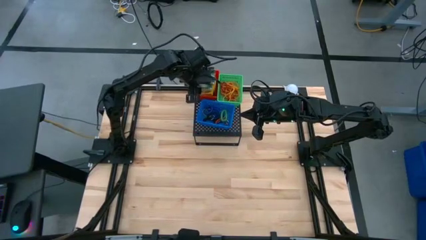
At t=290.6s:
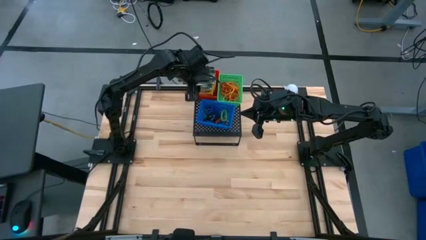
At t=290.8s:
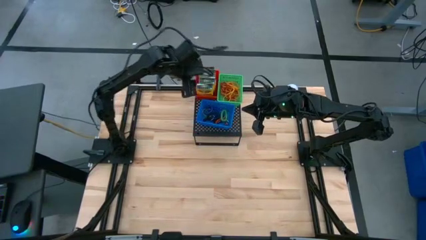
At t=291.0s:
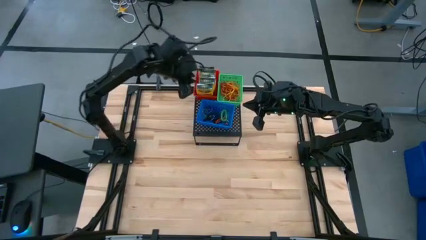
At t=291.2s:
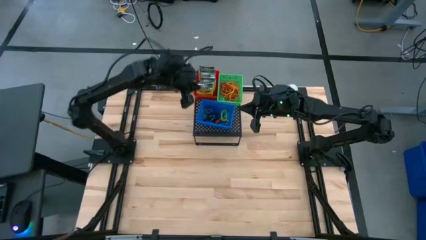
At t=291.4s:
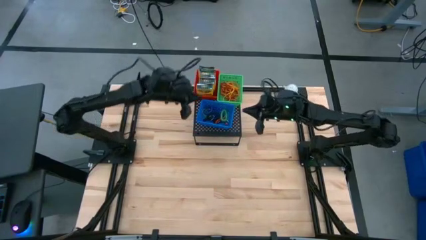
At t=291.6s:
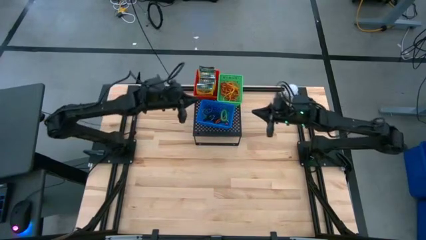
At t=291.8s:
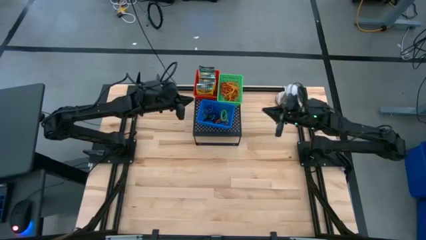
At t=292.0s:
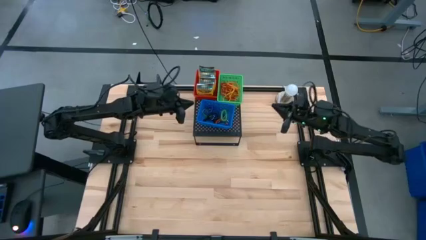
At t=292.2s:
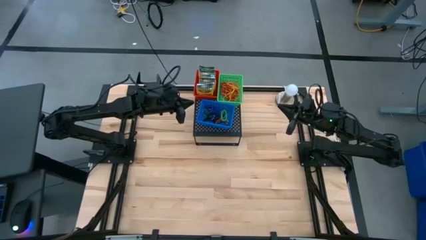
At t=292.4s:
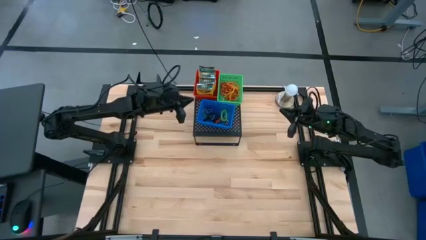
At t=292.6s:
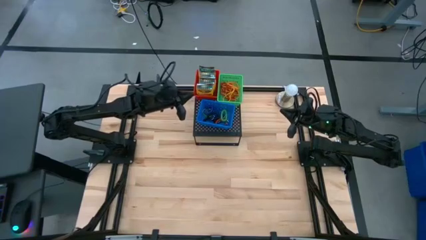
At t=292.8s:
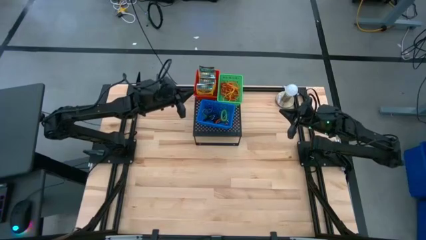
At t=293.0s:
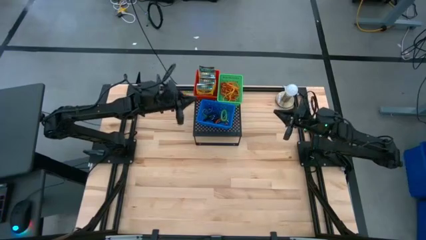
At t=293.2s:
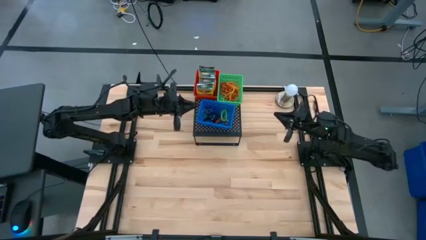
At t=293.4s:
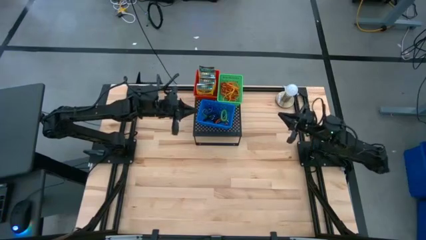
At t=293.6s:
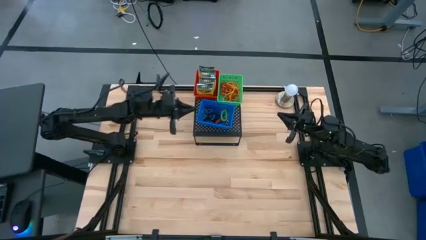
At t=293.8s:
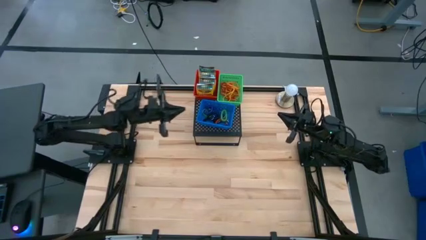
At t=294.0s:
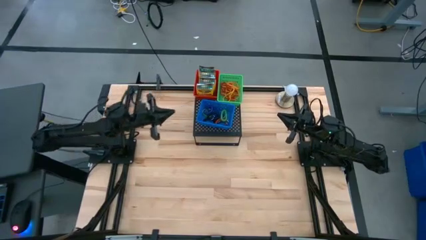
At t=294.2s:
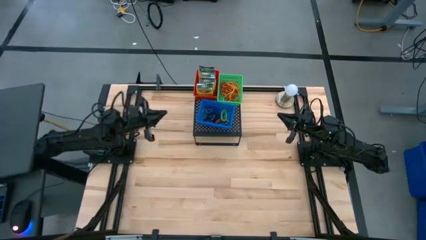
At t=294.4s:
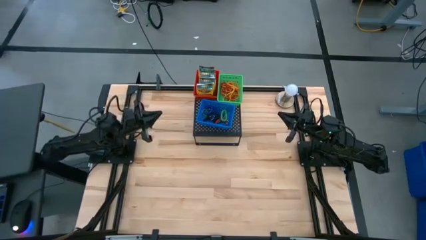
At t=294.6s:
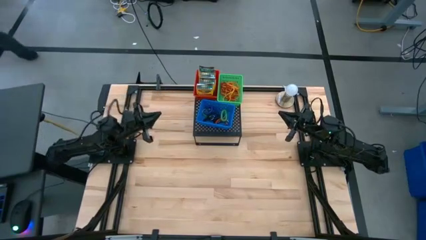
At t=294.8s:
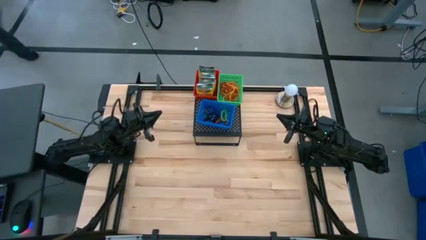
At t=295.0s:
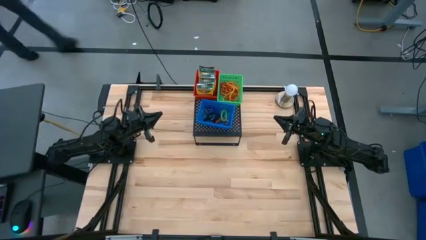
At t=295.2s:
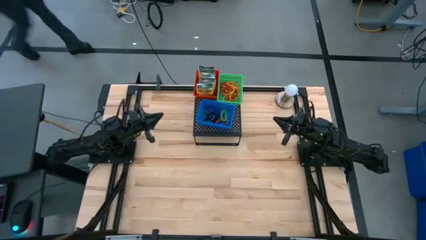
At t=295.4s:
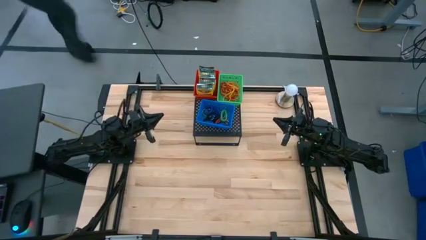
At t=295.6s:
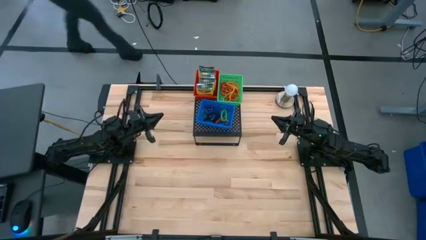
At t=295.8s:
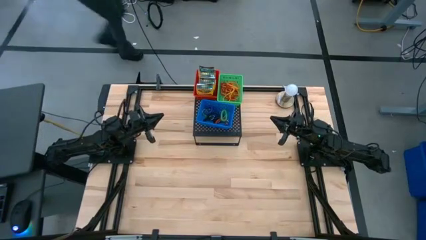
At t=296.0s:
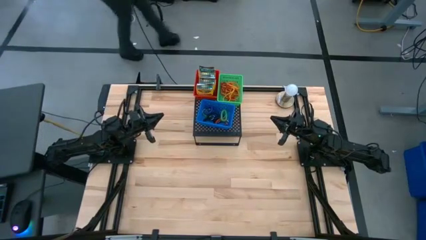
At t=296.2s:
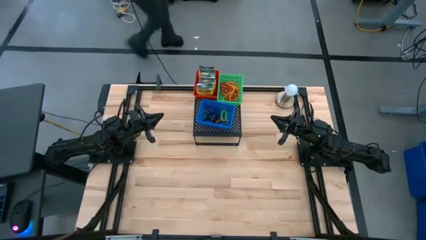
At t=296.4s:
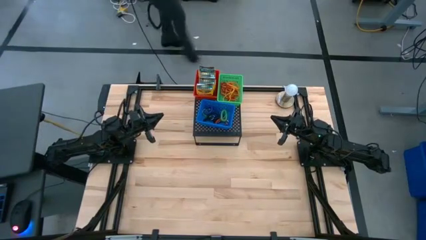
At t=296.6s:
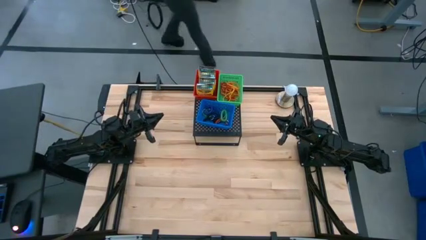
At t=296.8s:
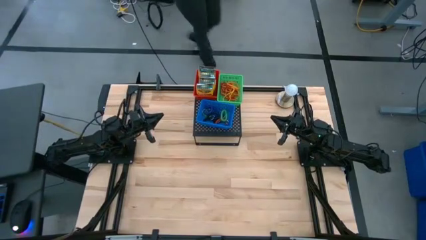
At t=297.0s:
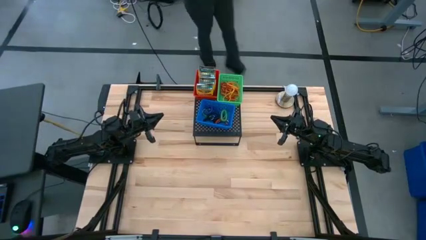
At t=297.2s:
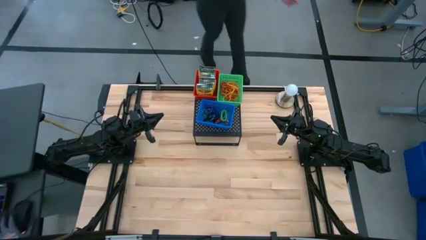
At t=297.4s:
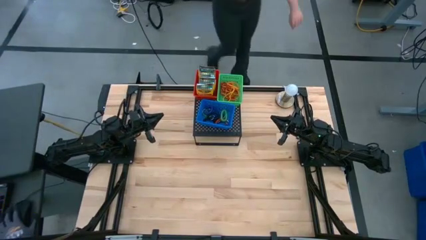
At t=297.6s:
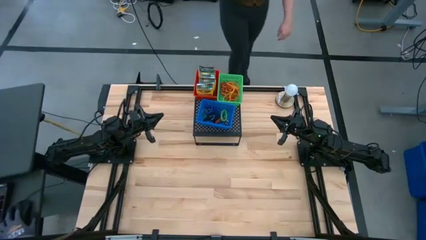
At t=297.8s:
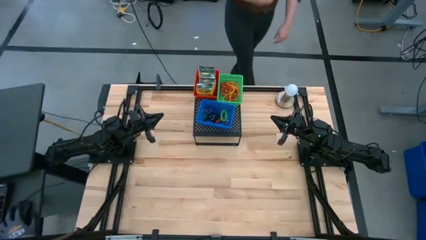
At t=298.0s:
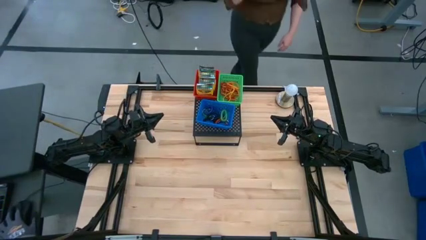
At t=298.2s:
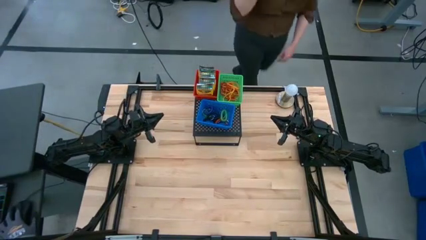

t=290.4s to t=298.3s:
Task: Pick & Place Office Desk Supplies
Return to Home Position

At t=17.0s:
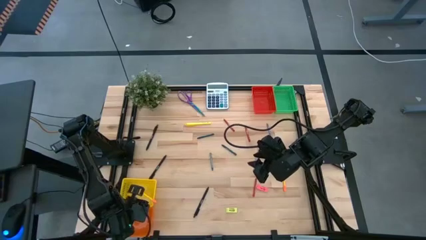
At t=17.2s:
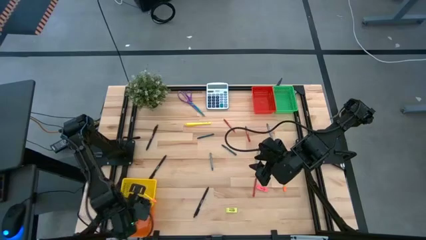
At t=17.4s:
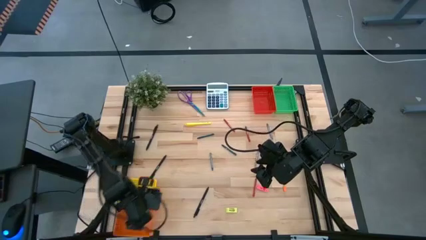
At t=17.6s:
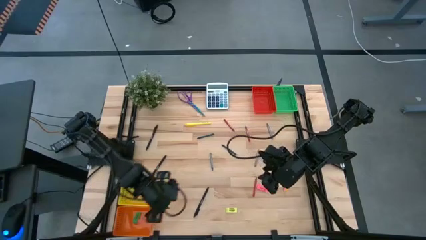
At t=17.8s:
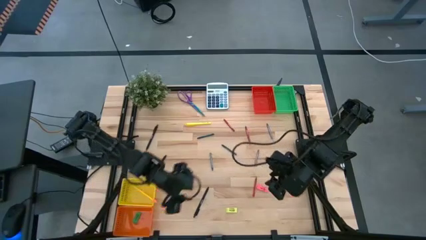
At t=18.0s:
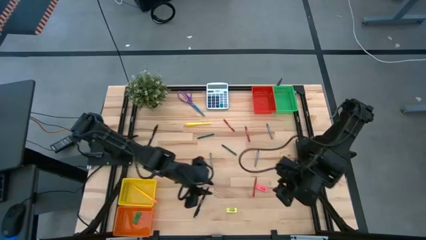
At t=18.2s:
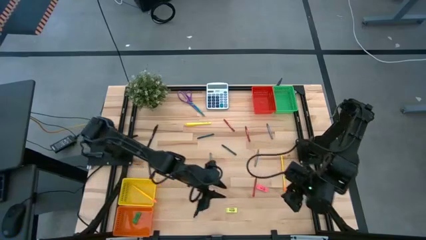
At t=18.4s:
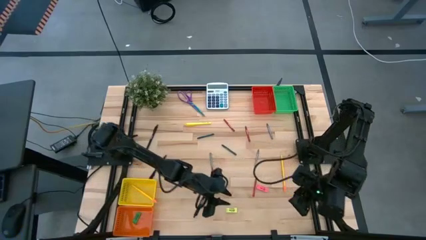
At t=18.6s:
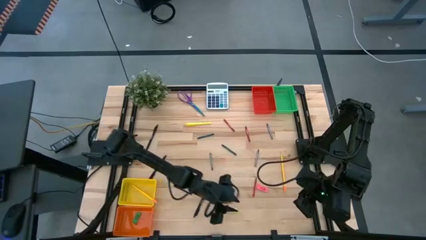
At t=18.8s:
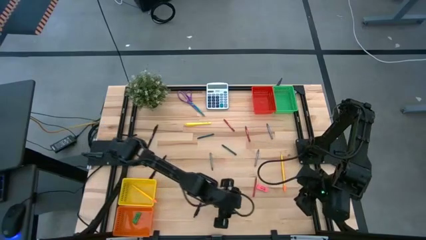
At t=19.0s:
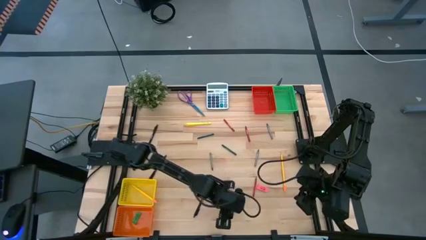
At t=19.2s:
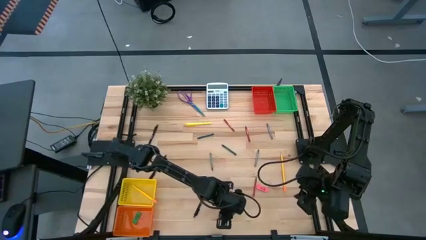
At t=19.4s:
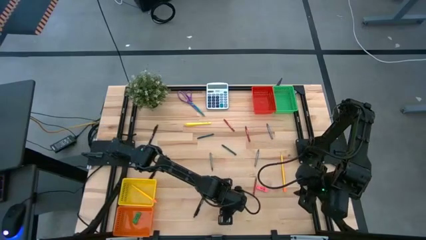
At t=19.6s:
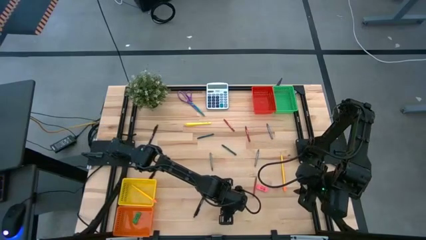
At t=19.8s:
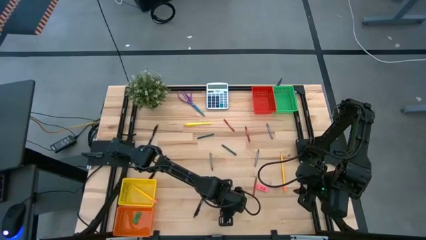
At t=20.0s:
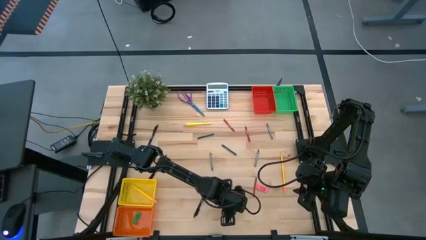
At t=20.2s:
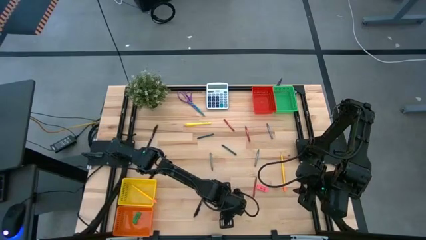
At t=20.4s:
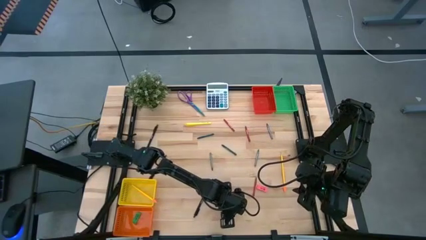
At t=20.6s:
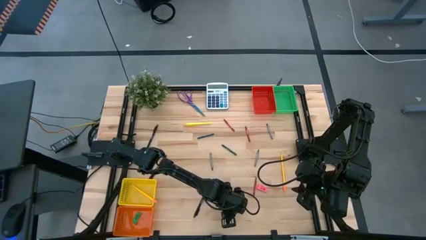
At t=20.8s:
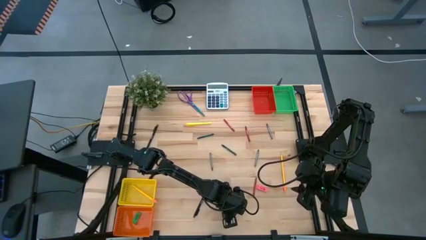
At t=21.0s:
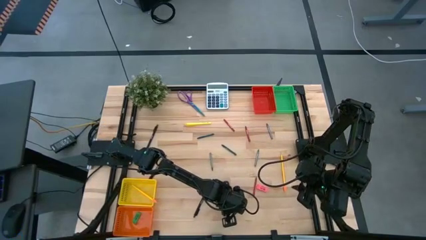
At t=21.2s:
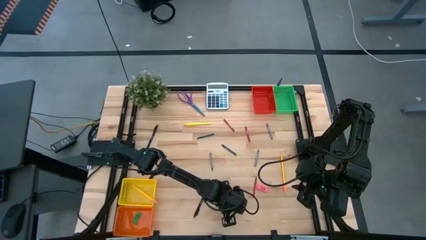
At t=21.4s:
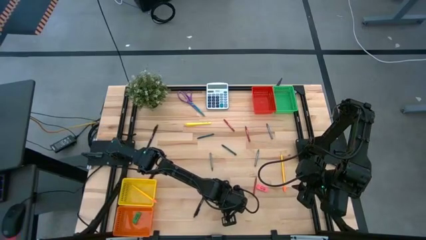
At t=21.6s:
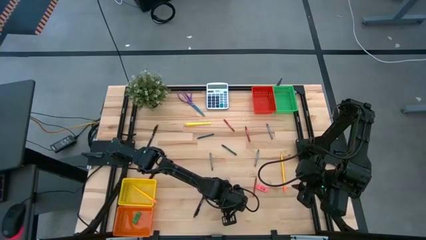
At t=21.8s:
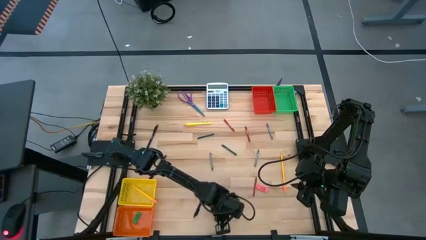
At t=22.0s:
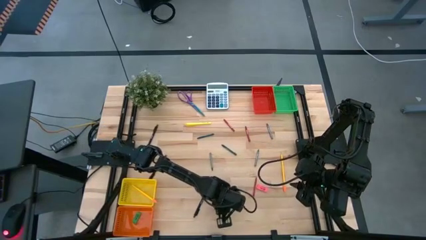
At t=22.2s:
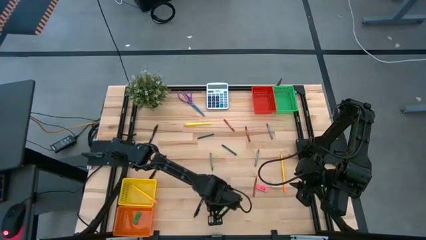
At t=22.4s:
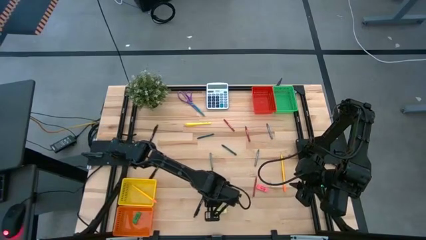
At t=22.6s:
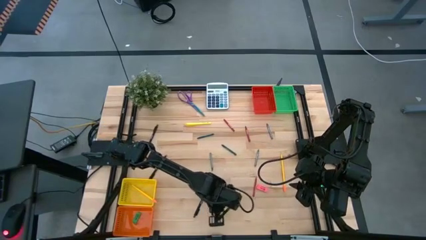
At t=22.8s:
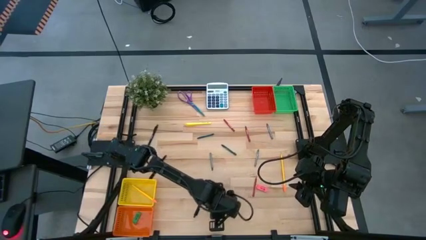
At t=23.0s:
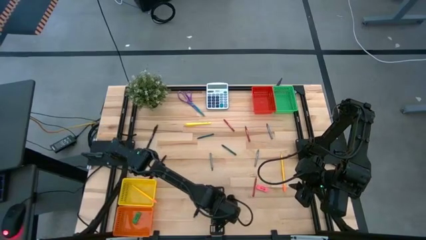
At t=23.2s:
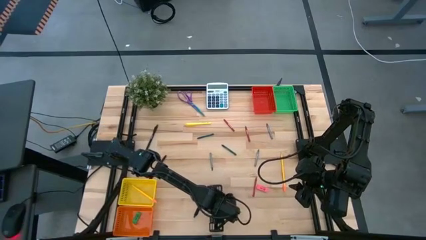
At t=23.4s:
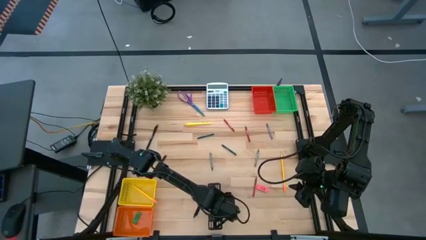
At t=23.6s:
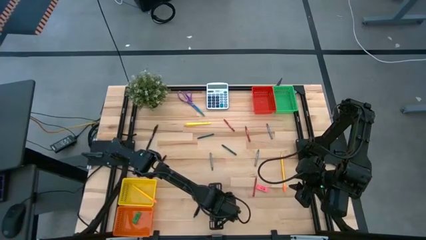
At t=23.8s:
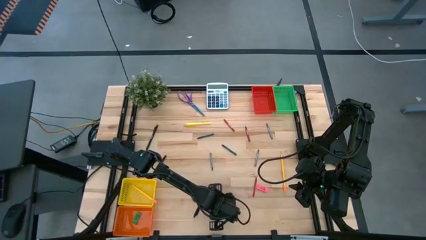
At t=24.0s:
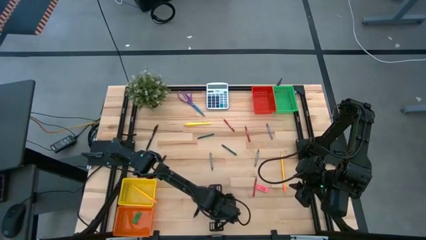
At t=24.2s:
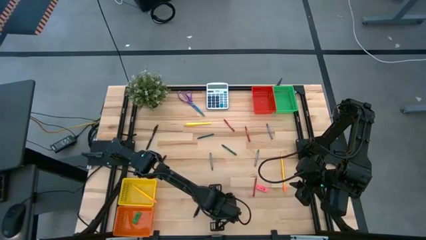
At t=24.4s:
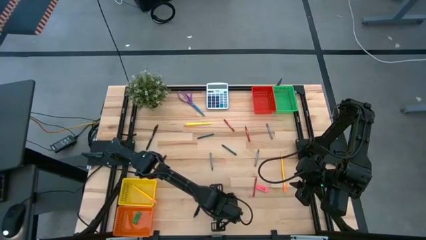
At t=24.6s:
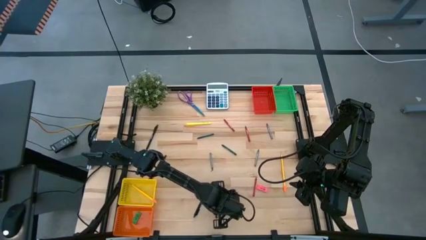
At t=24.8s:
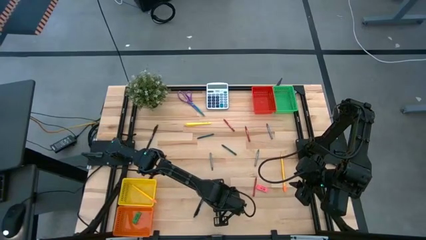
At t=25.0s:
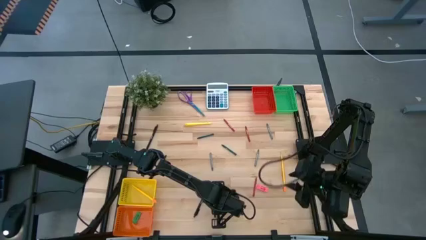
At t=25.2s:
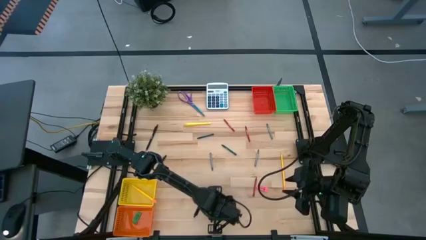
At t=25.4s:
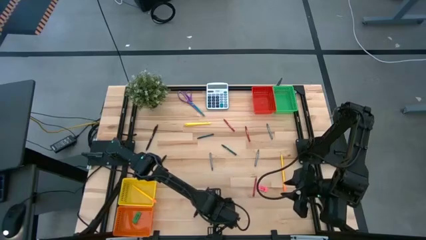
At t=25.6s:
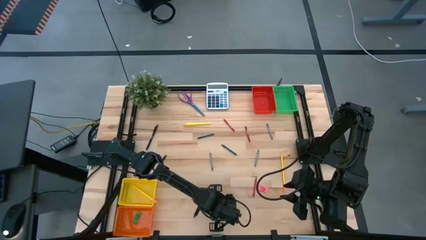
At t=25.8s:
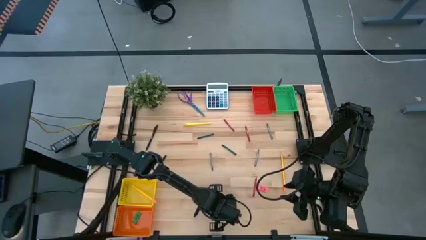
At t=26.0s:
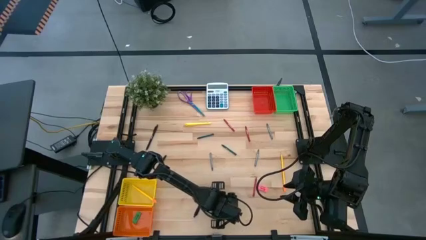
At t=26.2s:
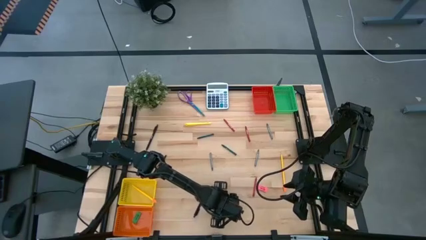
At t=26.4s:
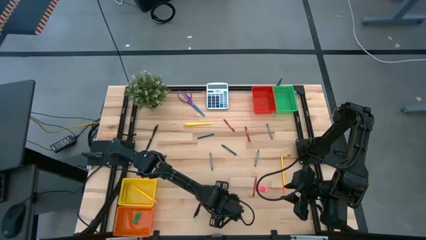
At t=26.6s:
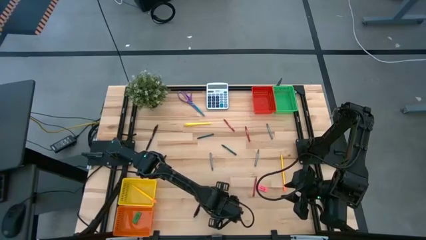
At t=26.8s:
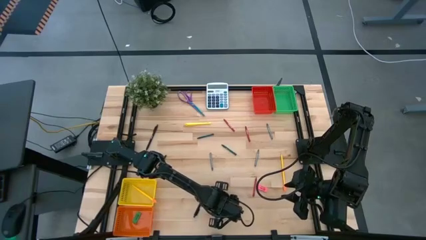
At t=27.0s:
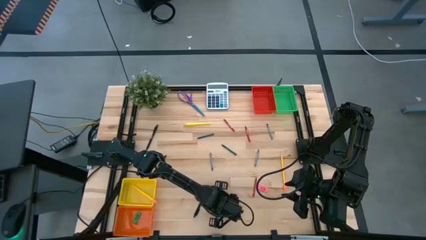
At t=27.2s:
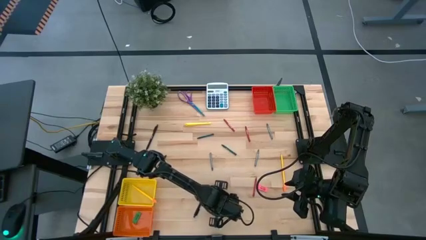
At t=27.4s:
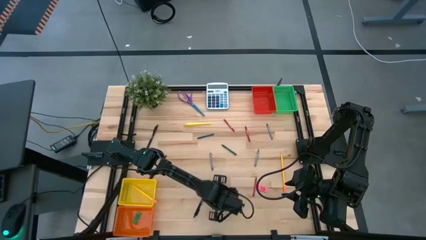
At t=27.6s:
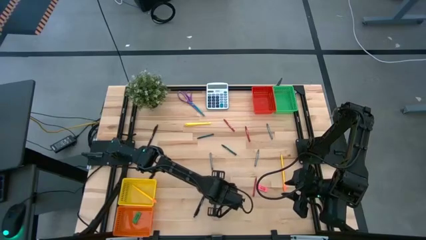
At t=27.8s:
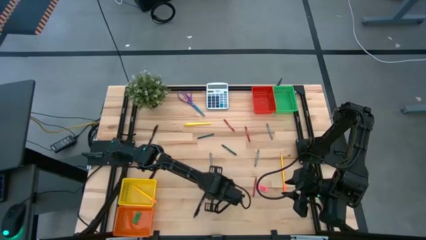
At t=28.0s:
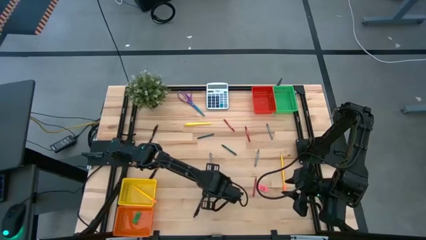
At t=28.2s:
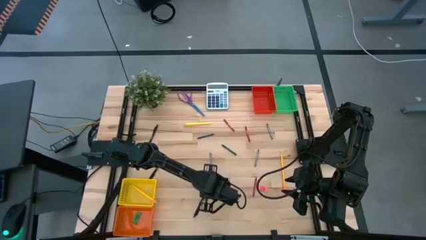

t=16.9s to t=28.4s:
Task: Sort crayons/erasers/pens/pencils in bins
Put the yellow eraser into the orange bin
